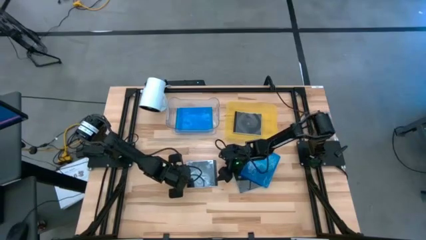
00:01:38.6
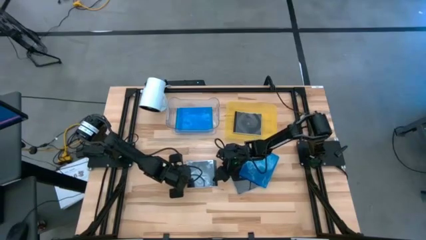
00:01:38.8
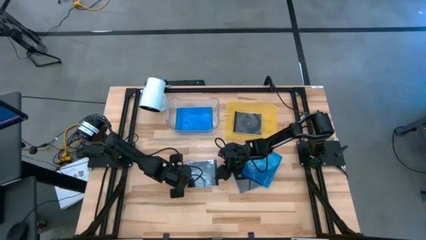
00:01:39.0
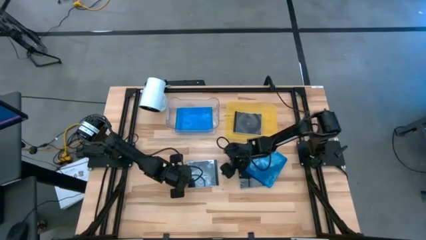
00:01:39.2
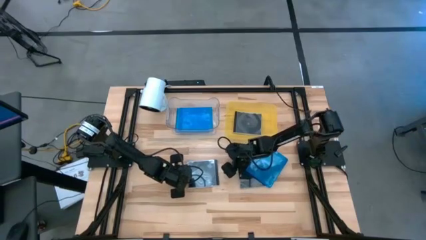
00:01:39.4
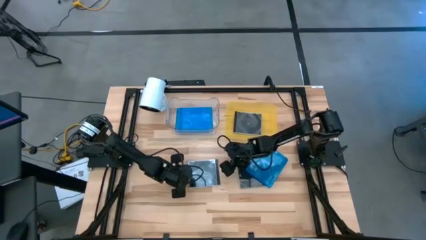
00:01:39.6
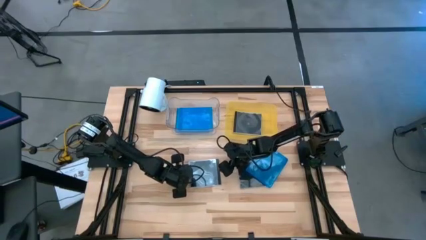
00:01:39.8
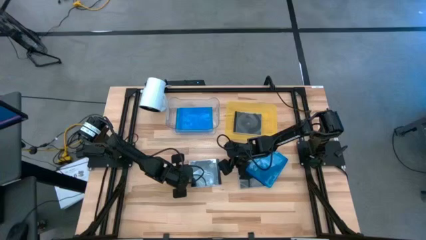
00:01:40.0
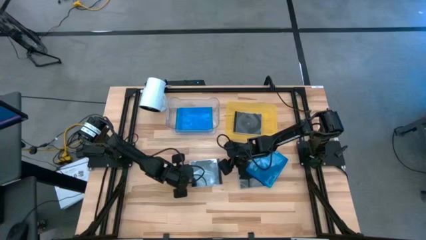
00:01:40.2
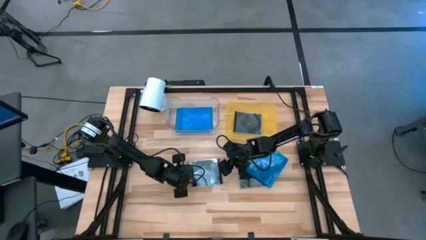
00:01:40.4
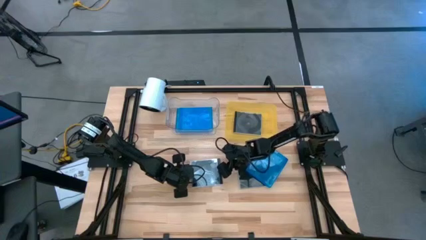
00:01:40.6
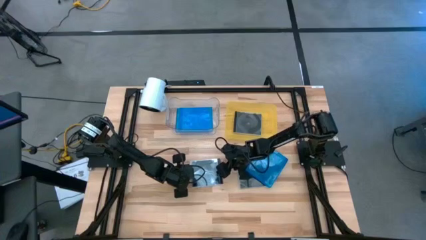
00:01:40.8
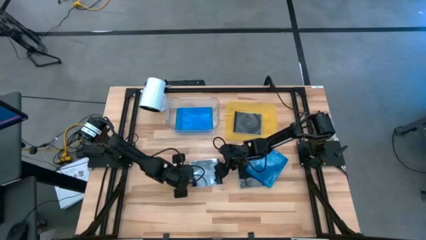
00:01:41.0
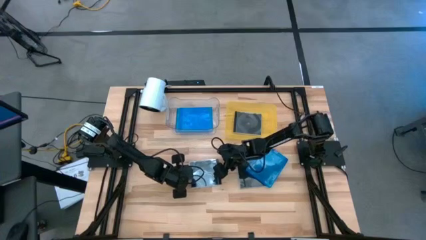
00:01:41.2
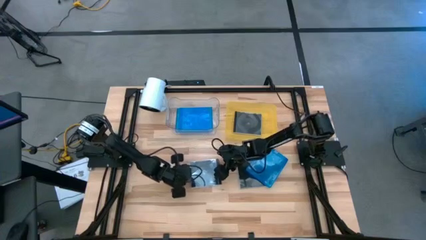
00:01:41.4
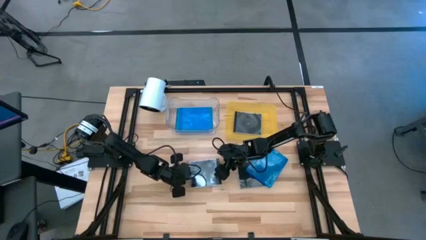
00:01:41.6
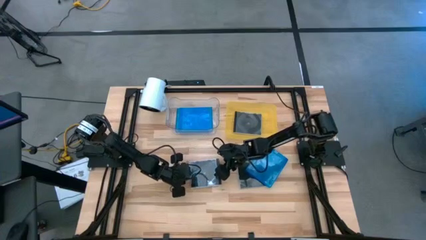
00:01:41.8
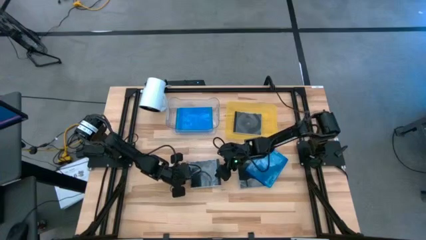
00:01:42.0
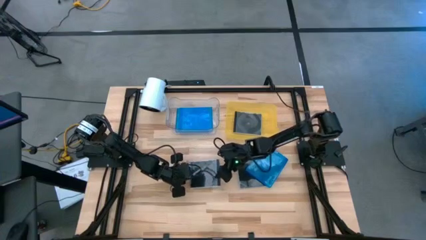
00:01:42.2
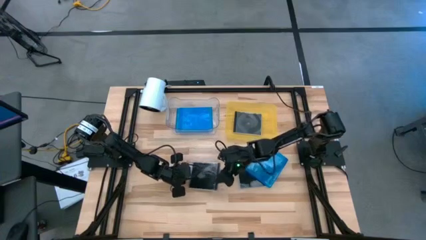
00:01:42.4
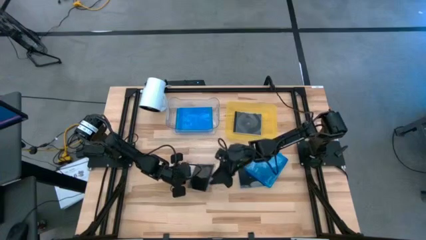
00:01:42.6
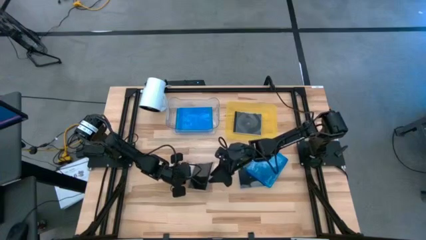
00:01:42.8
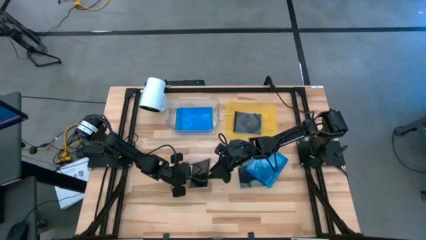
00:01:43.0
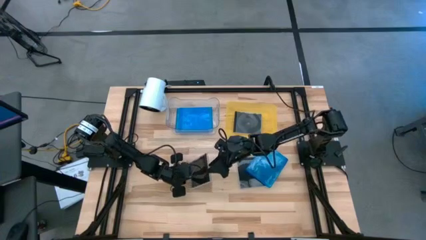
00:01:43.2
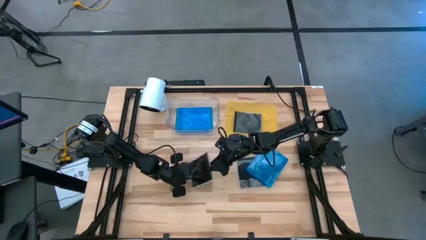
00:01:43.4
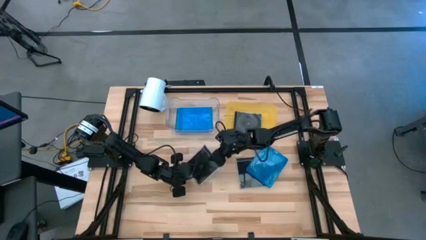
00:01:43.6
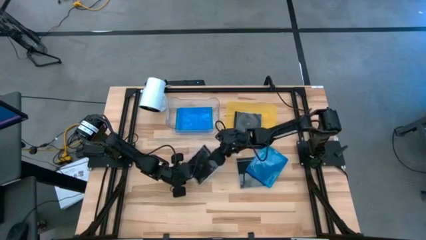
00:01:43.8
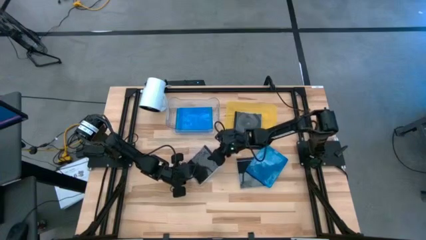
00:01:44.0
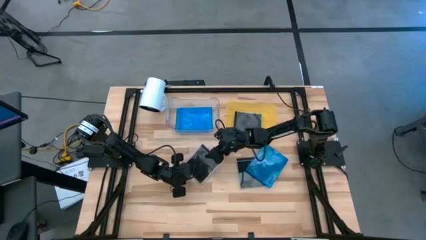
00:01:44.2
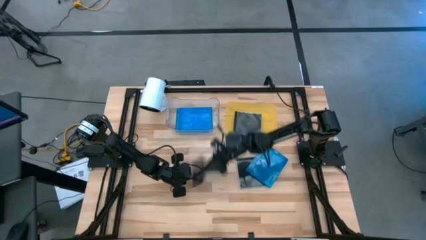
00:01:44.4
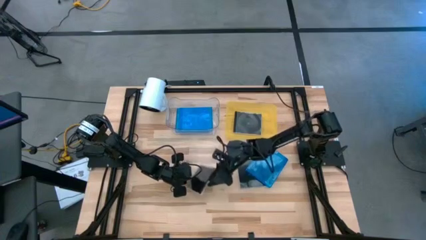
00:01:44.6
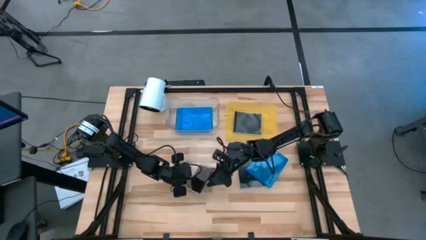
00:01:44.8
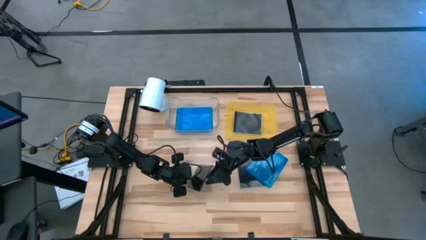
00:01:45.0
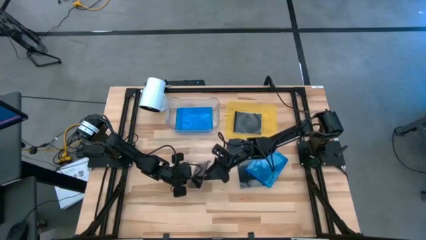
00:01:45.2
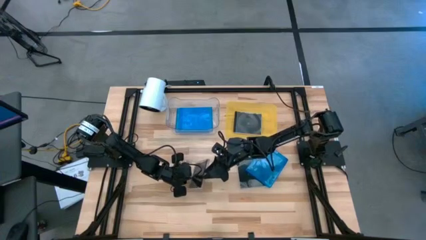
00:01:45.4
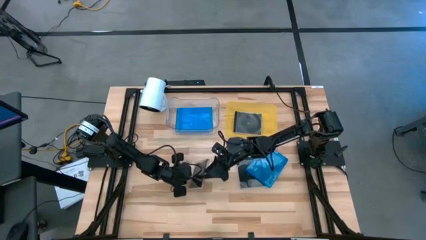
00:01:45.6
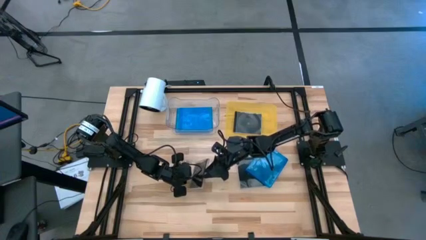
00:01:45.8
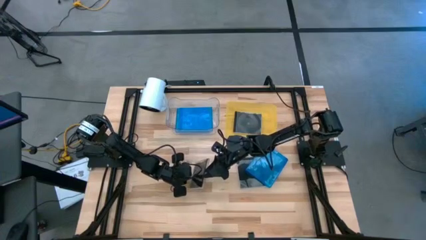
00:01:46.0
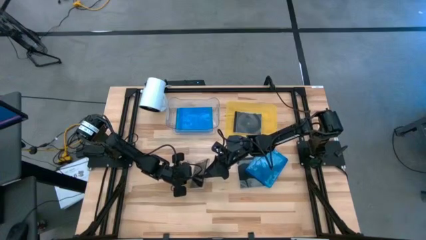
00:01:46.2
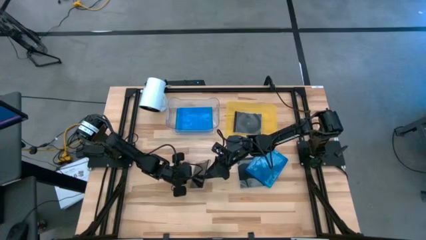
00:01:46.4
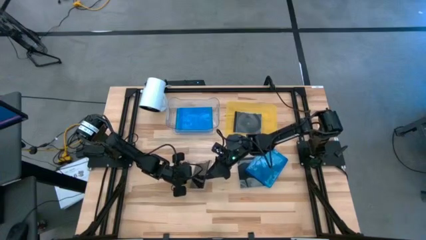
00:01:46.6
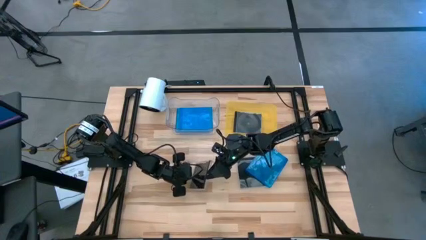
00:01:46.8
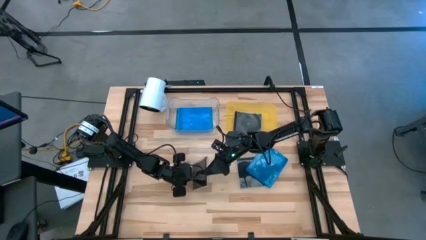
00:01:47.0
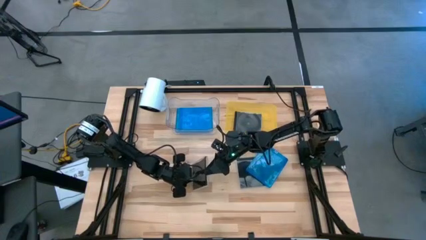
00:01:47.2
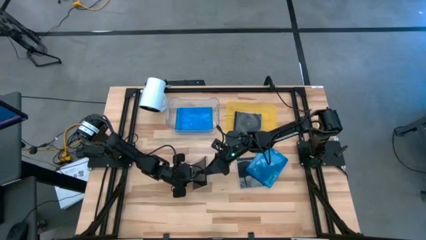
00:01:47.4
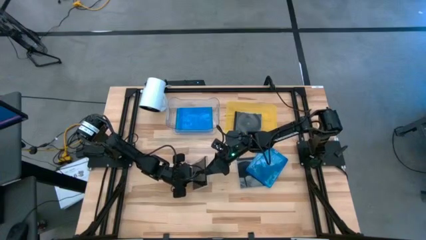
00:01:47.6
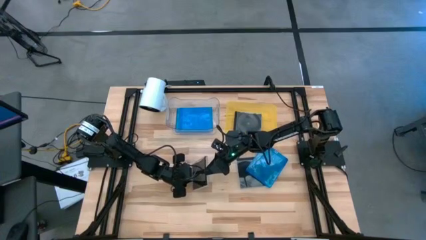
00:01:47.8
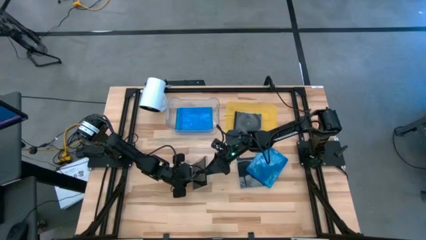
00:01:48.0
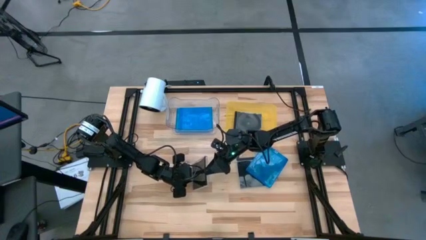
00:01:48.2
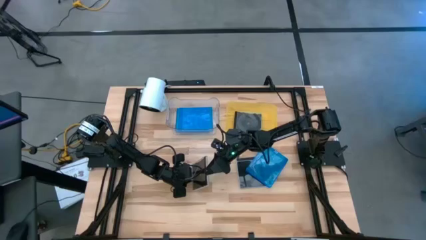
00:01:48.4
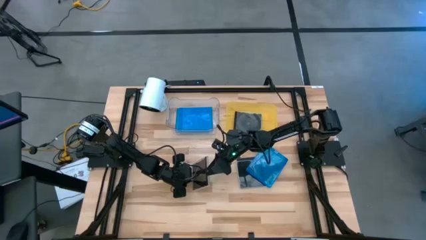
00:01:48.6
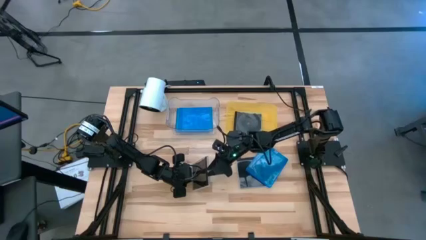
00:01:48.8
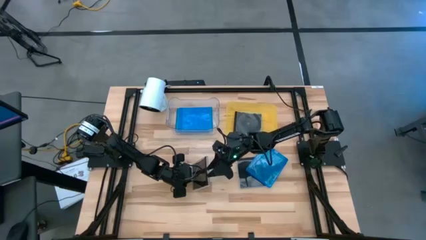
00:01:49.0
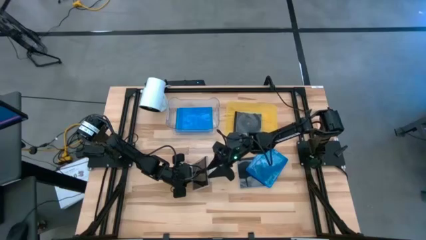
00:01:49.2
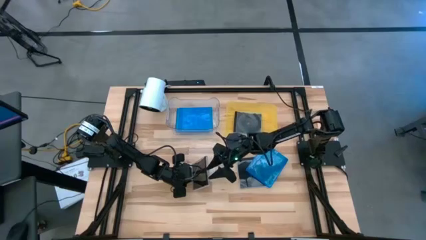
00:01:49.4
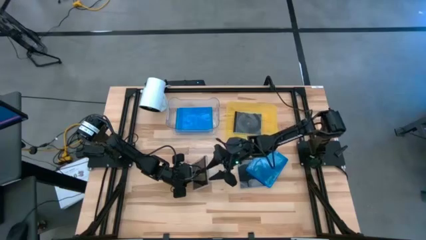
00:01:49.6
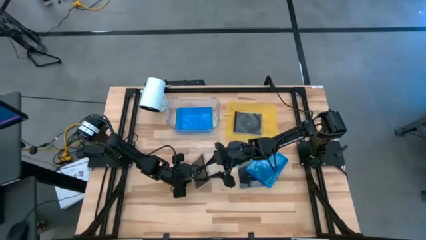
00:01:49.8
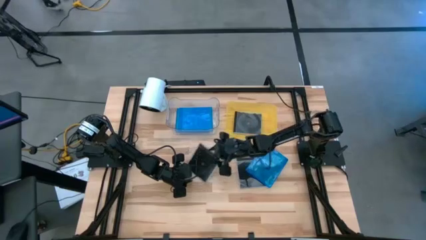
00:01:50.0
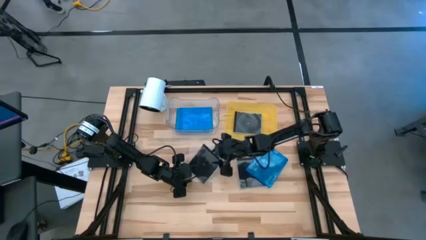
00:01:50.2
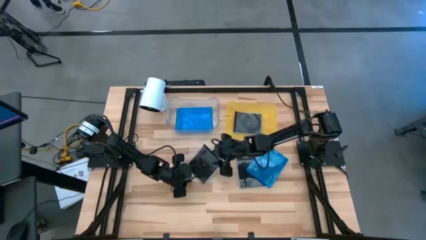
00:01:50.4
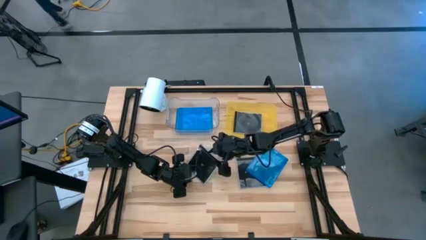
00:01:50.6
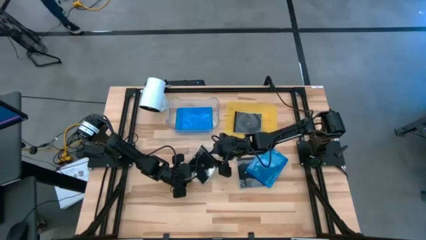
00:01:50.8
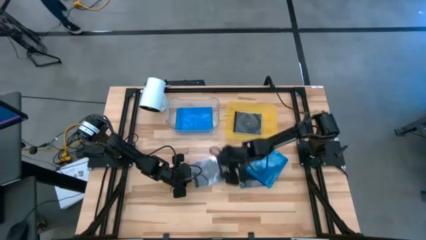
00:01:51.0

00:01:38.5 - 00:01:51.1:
Task: Pick & place jewel cases by type
Put the left black CD case into the yellow bin
